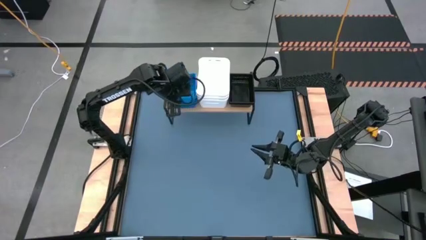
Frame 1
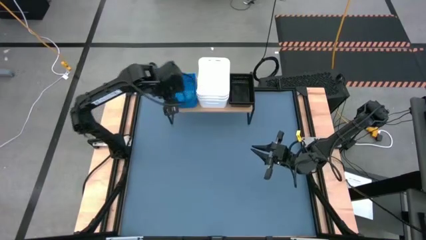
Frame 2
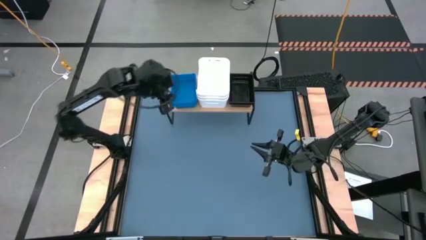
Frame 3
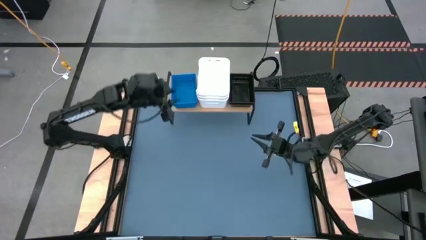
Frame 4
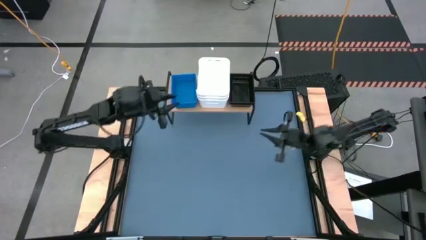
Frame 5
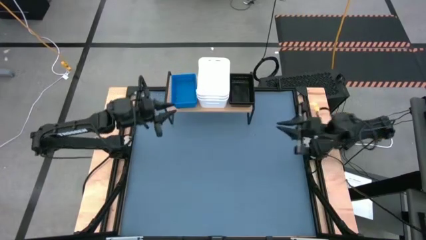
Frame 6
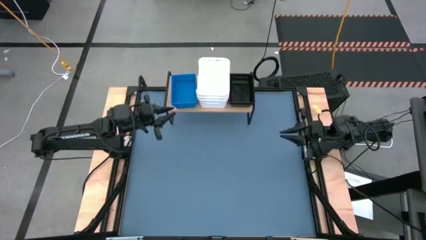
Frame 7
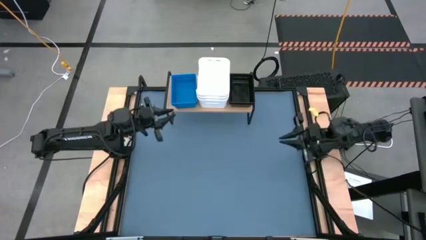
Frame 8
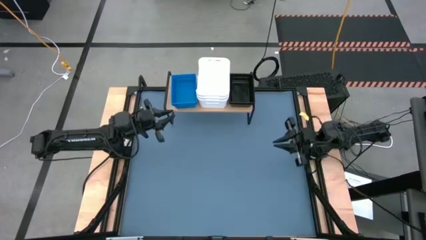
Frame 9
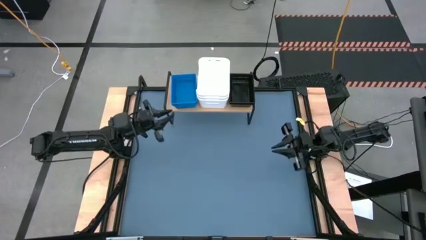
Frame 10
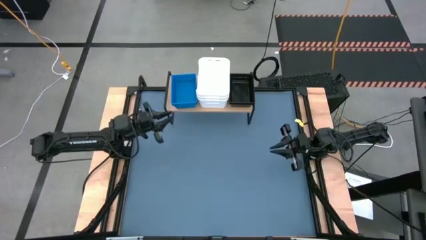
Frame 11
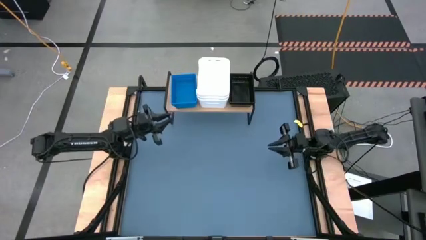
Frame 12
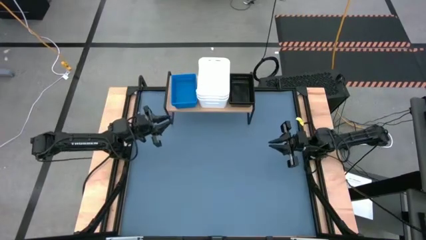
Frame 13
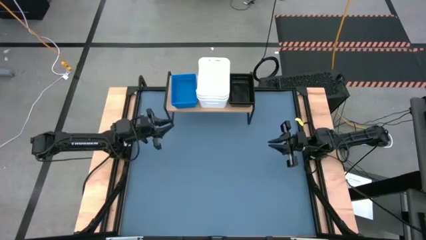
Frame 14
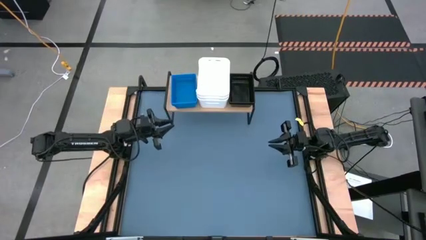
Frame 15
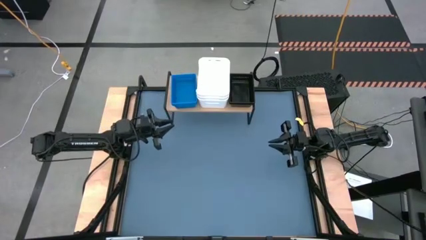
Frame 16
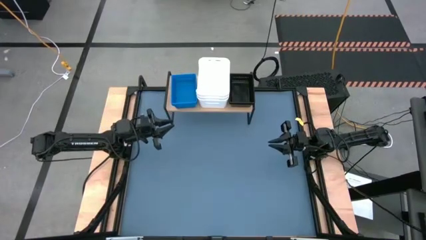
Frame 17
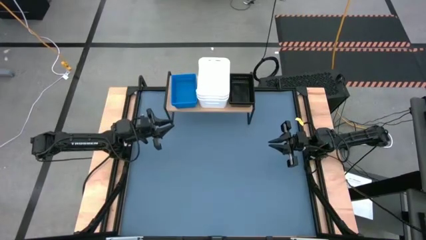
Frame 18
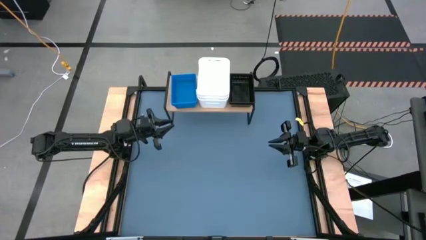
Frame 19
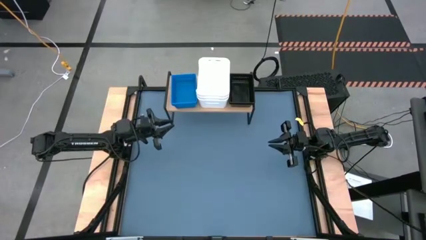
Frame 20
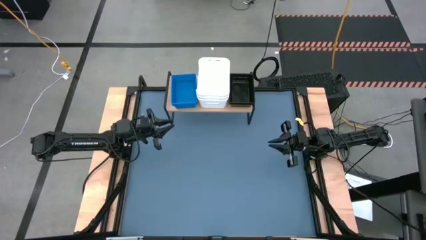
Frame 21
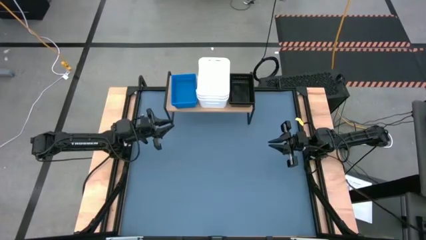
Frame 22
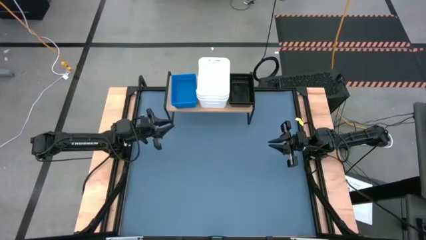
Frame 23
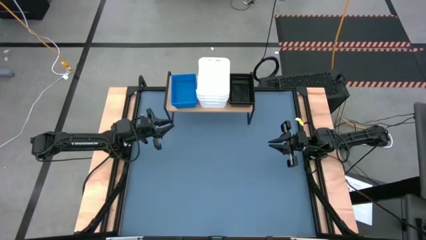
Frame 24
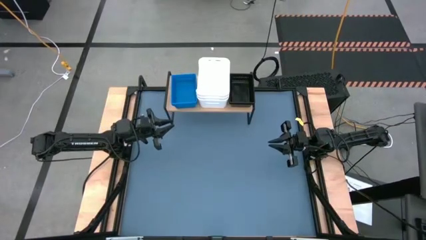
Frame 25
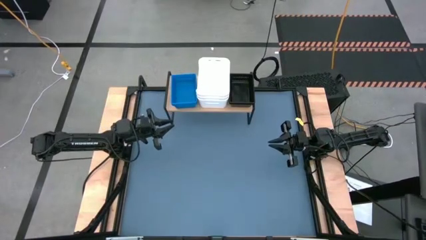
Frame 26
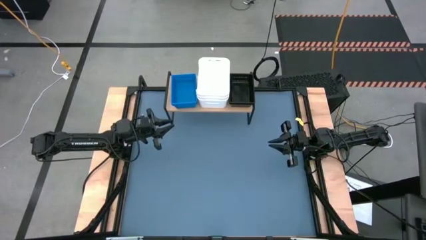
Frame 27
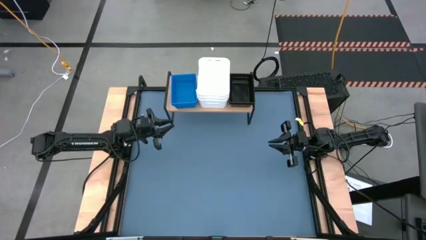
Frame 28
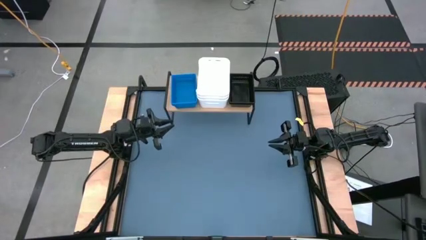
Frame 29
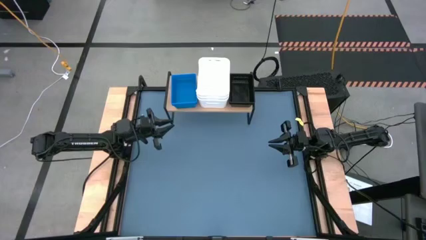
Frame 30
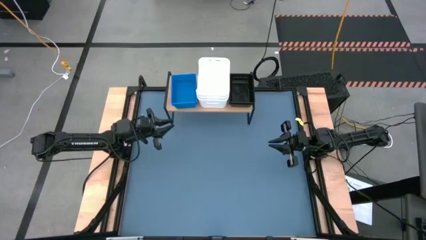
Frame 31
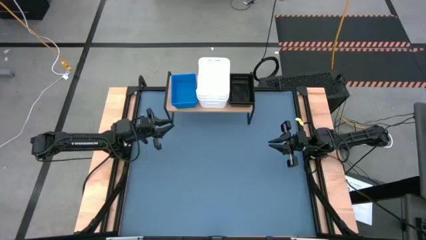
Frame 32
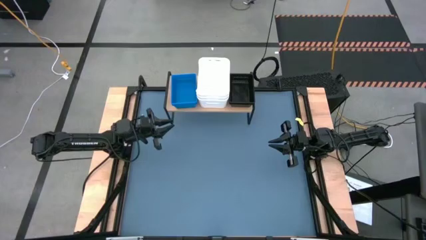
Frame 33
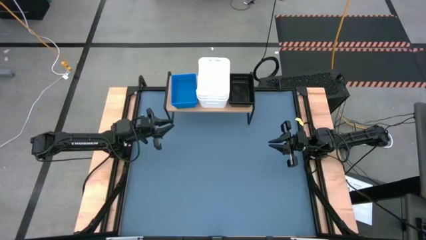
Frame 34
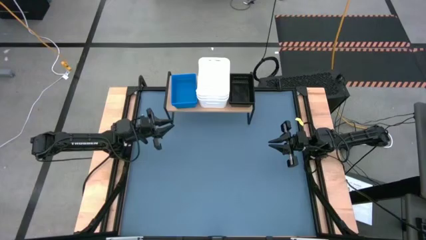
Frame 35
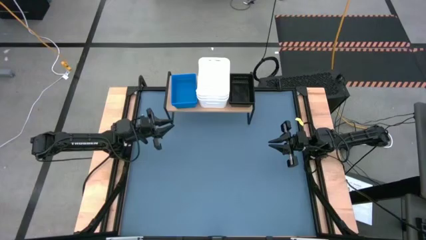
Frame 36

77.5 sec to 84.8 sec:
Task: Stack baskets on shelf by color
Return to Home Position

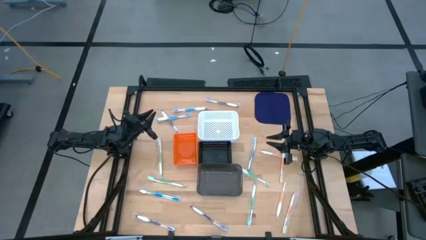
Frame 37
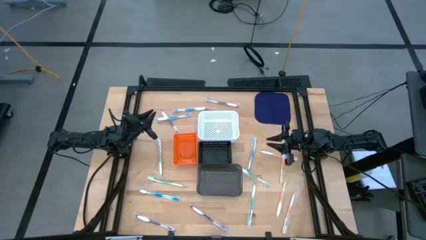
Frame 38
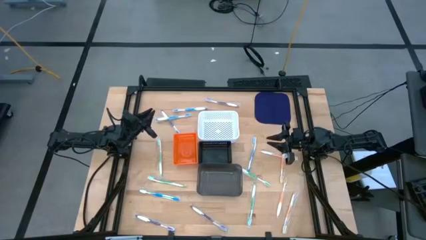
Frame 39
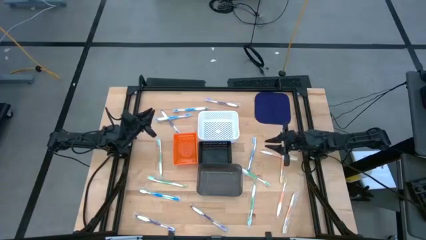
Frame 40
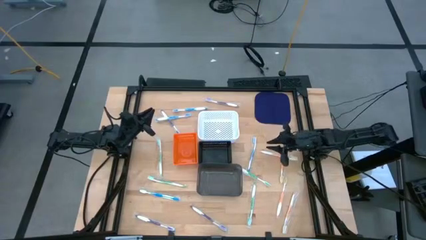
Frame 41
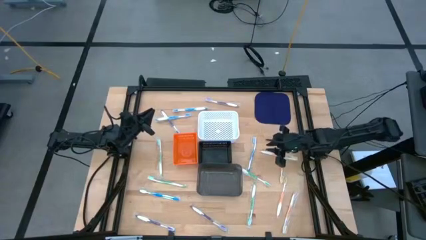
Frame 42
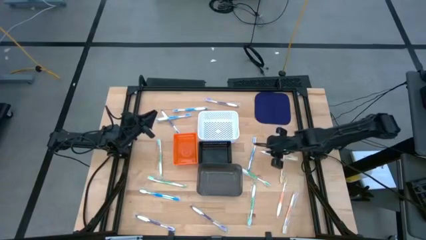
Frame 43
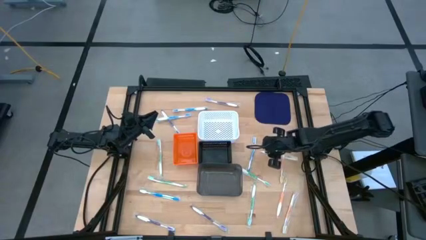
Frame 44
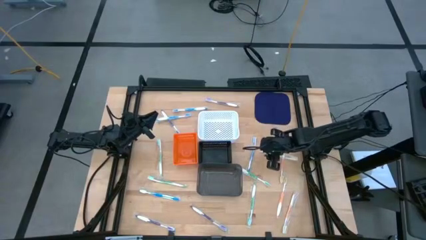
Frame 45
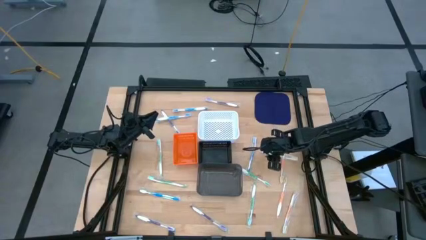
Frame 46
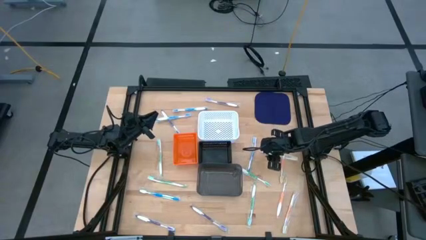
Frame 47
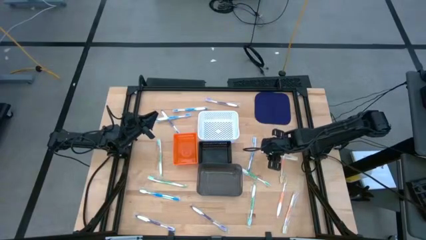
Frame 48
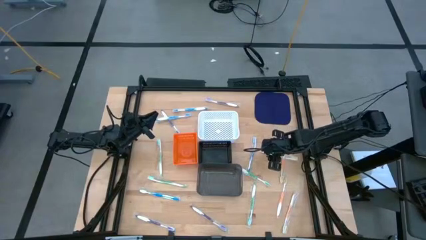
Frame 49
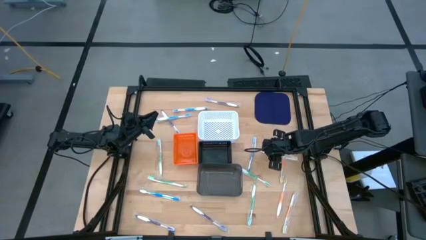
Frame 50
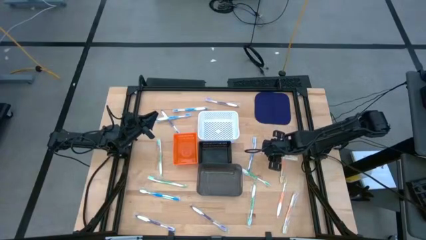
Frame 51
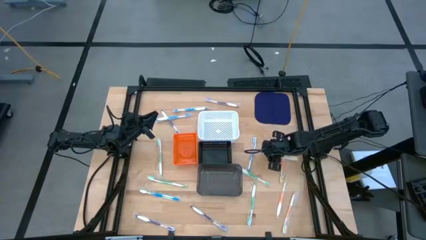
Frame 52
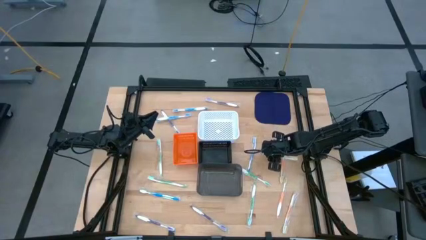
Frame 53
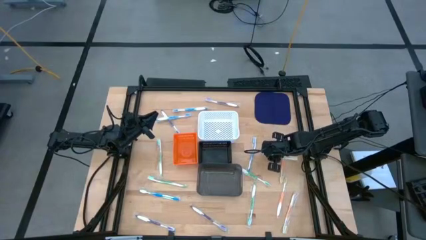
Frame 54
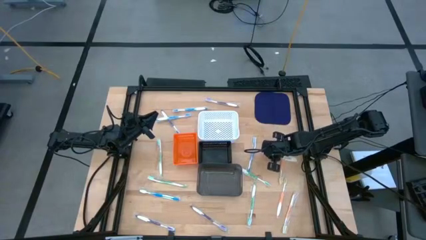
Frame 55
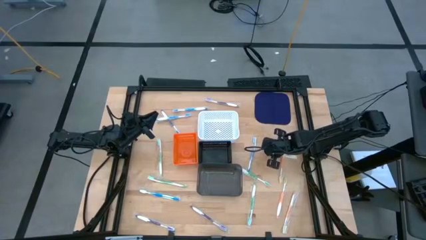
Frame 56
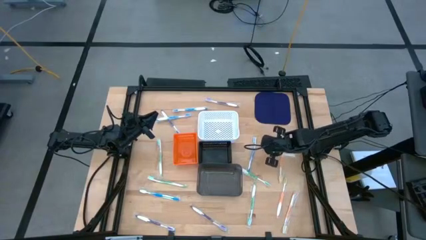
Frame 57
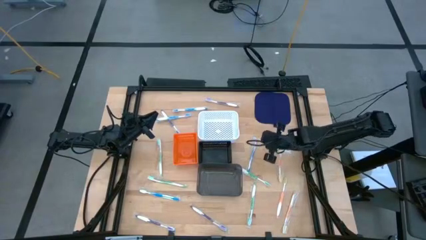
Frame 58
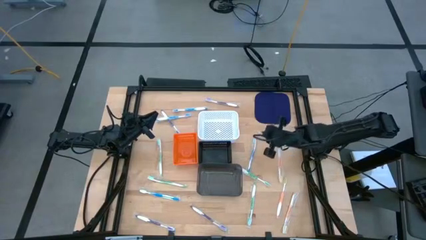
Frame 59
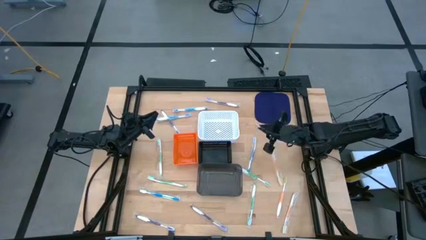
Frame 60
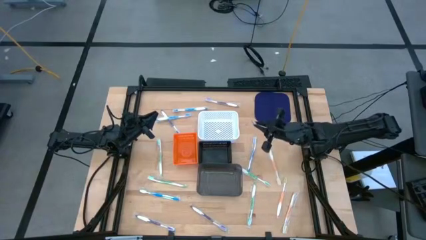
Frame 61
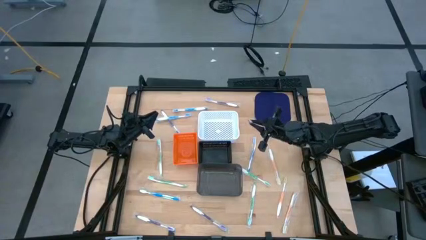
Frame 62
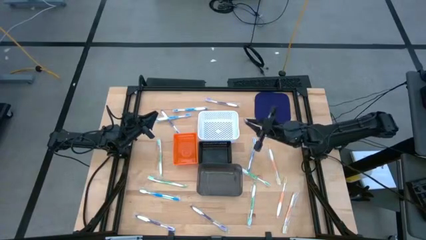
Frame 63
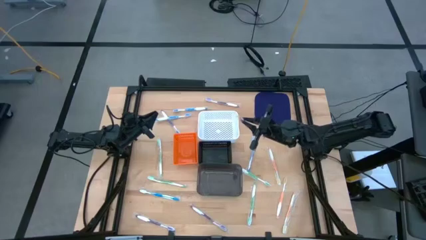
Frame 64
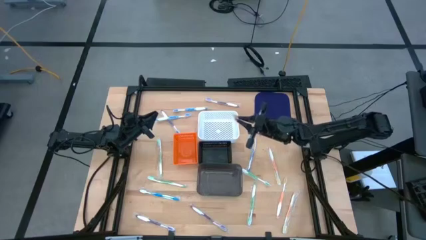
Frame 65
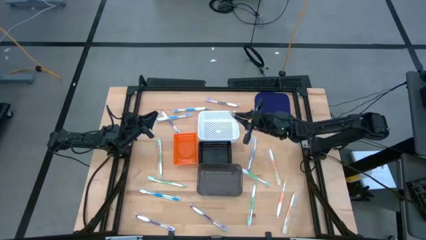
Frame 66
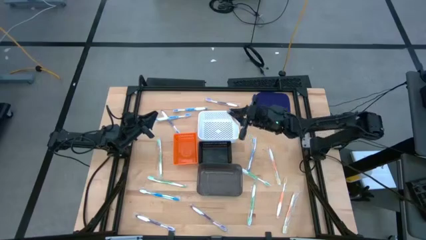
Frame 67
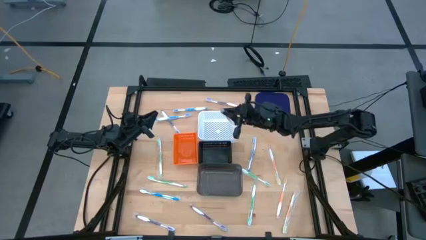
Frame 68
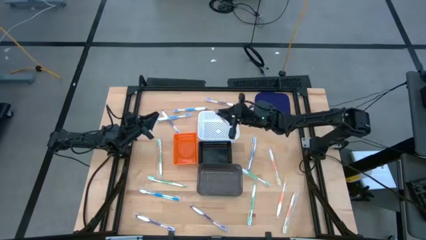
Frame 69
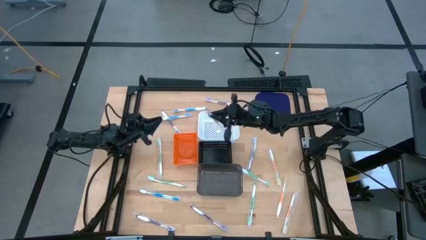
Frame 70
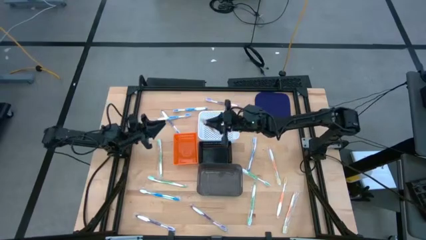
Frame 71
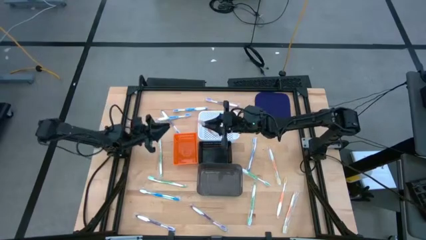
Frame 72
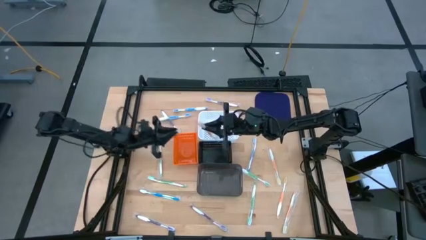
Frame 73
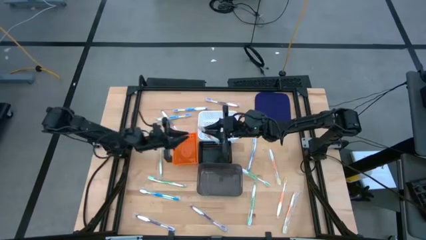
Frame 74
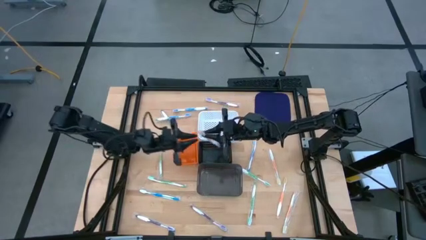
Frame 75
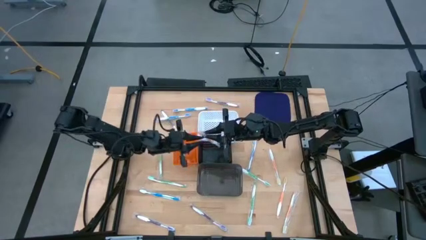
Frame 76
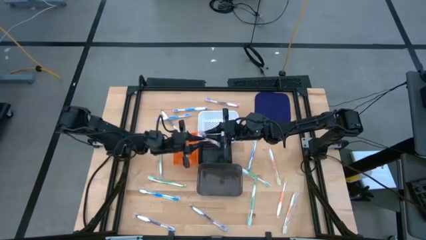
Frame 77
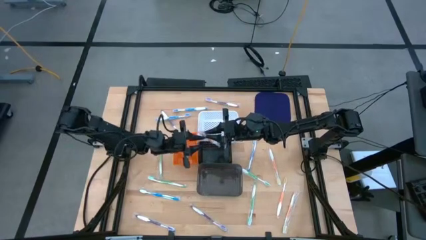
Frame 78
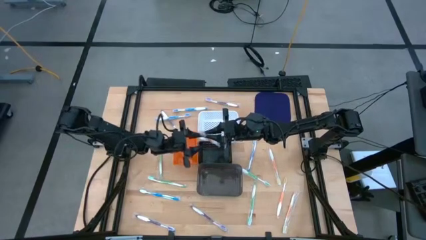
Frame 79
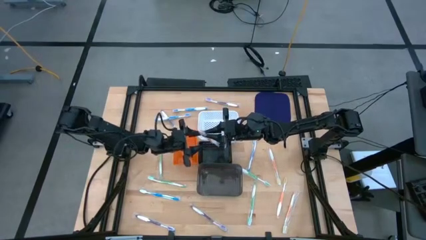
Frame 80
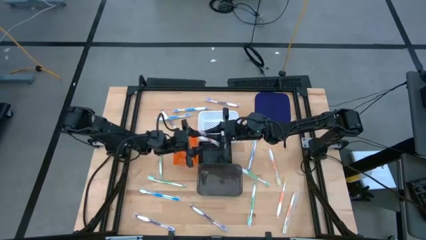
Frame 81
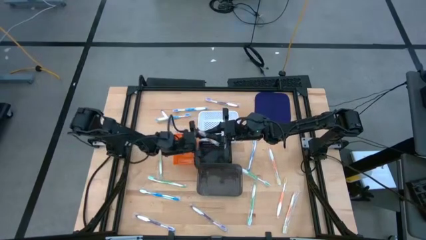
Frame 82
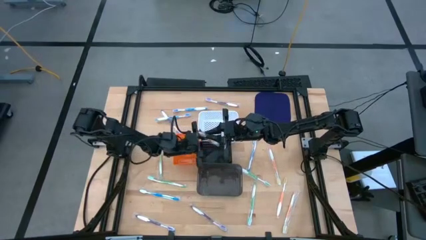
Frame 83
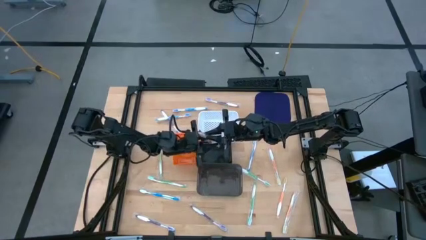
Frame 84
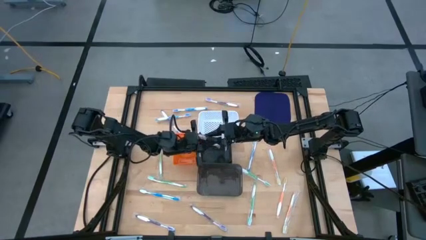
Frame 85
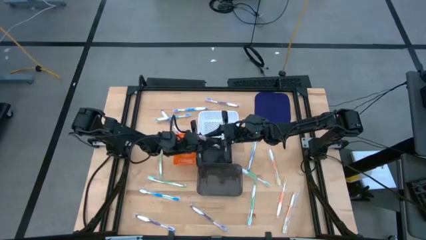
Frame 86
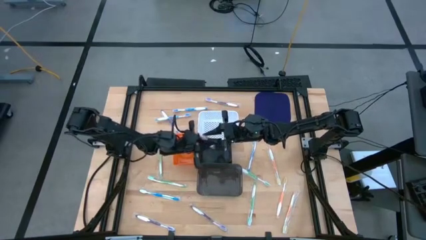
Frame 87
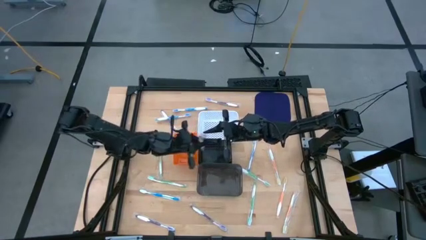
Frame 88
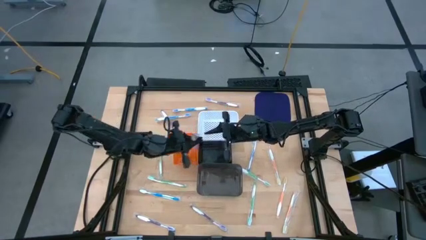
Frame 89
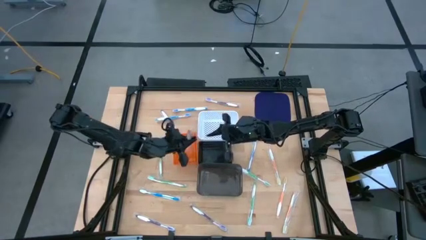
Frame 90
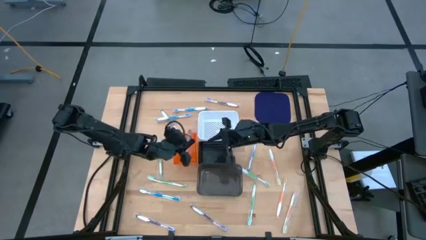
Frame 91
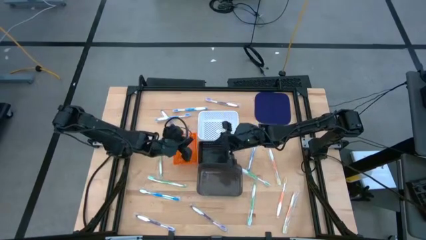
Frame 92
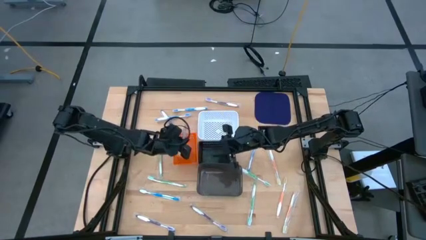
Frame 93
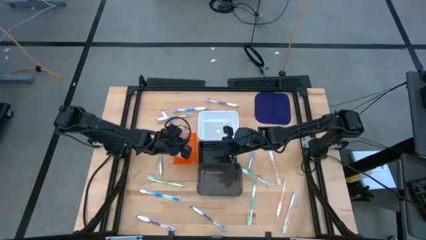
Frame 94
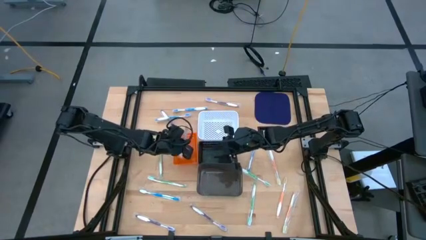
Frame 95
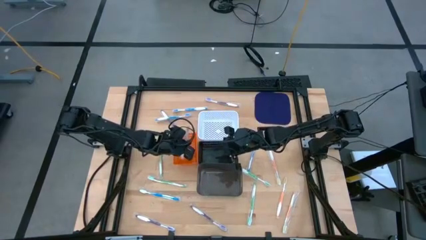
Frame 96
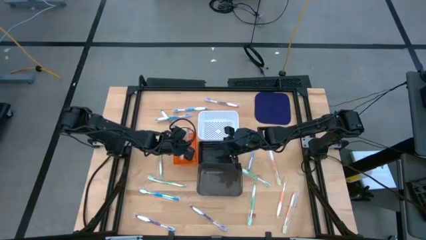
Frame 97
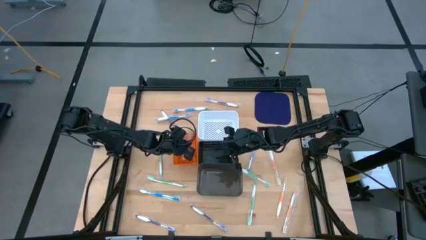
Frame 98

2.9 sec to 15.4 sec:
Task: Pick & Place Toothbrushes
Put the orange toothbrush into the orange basket
